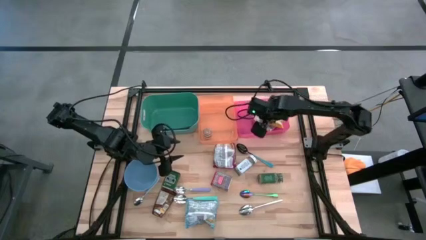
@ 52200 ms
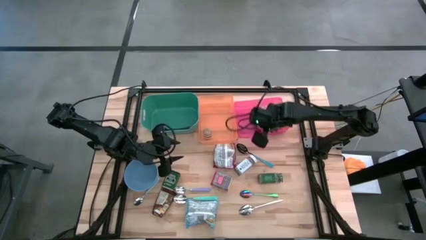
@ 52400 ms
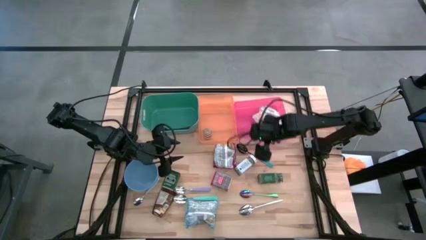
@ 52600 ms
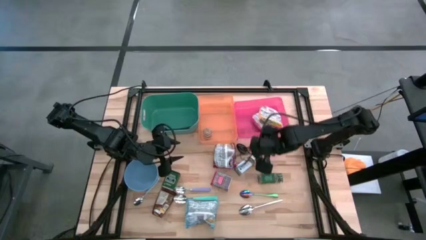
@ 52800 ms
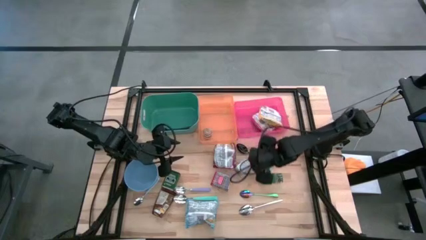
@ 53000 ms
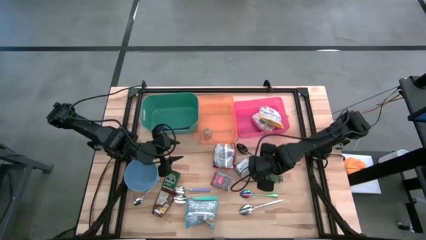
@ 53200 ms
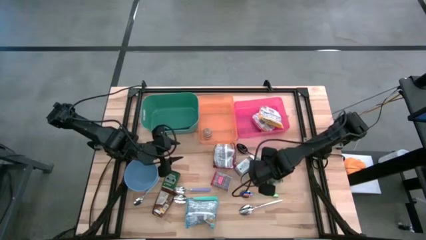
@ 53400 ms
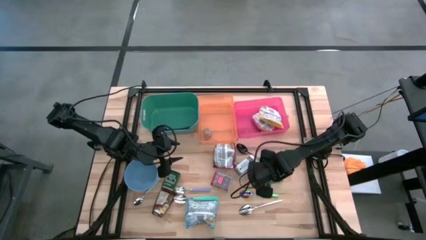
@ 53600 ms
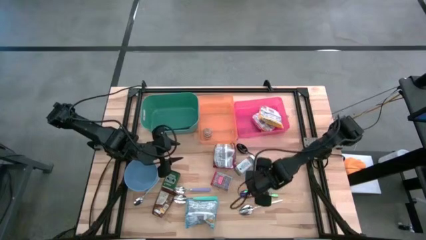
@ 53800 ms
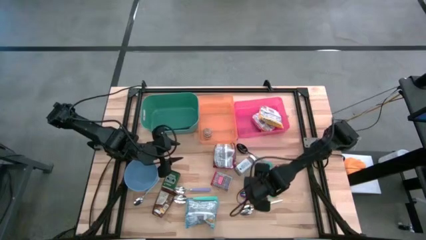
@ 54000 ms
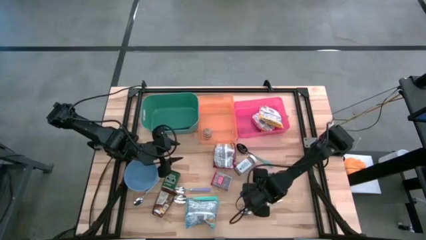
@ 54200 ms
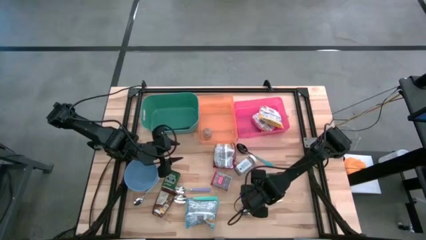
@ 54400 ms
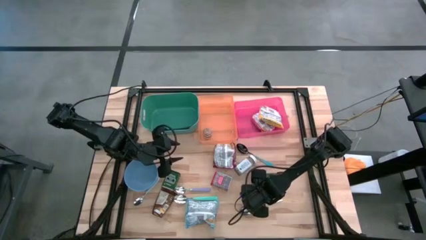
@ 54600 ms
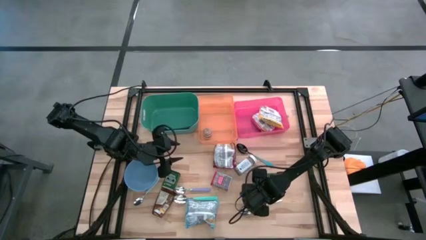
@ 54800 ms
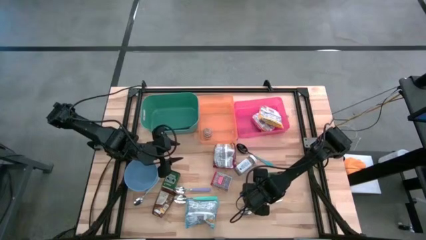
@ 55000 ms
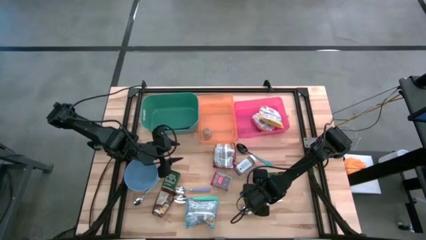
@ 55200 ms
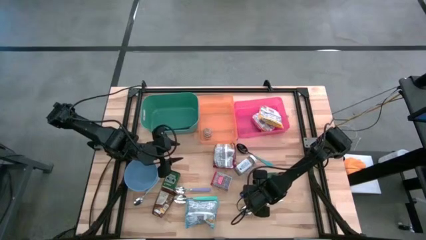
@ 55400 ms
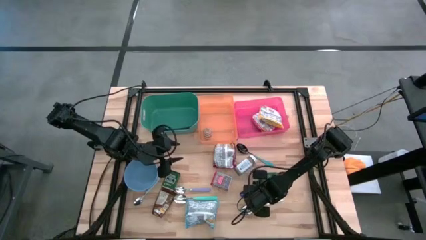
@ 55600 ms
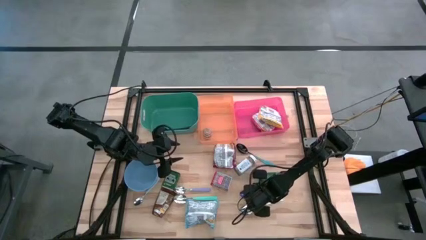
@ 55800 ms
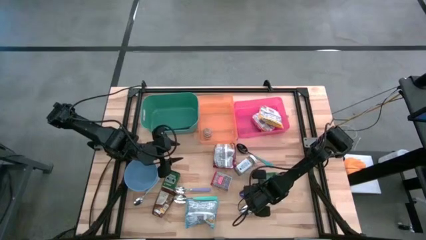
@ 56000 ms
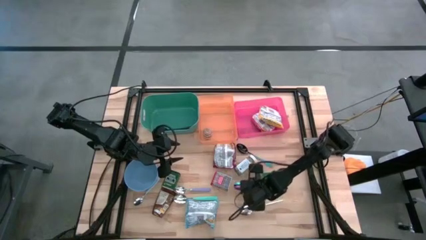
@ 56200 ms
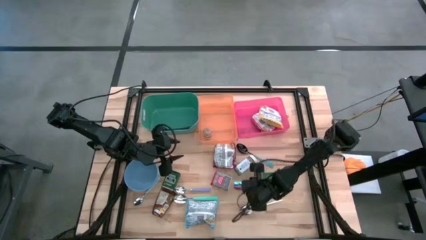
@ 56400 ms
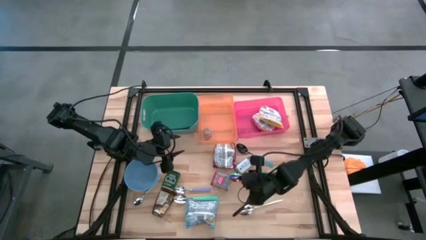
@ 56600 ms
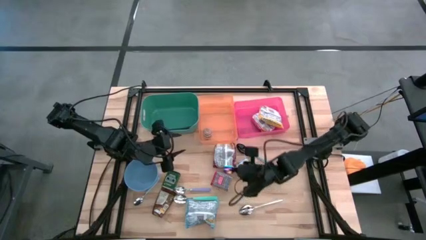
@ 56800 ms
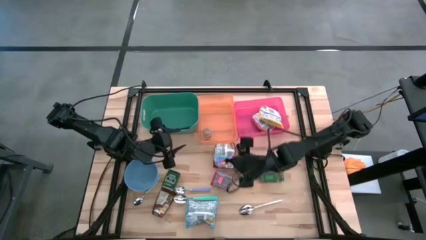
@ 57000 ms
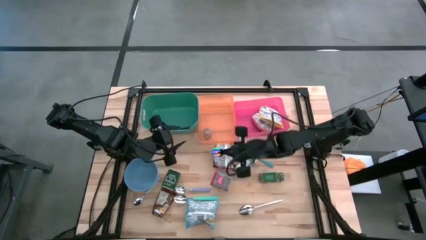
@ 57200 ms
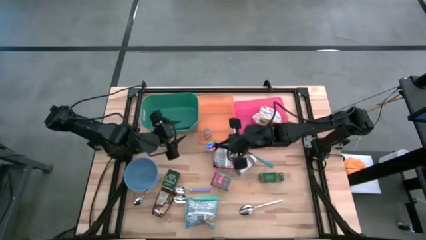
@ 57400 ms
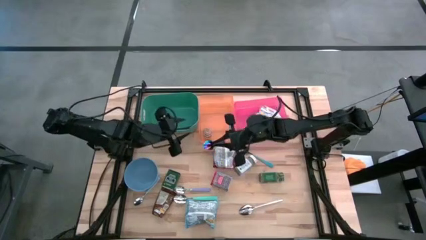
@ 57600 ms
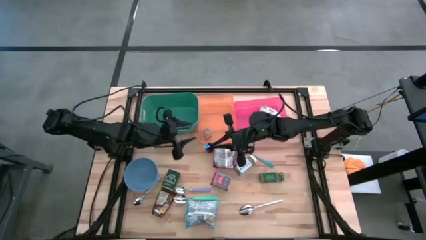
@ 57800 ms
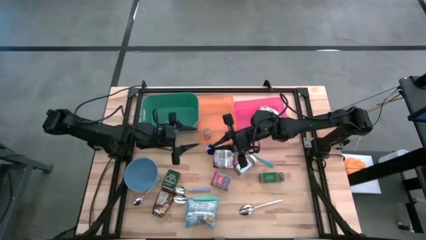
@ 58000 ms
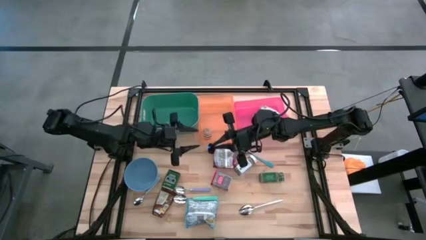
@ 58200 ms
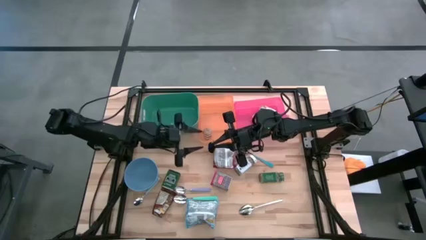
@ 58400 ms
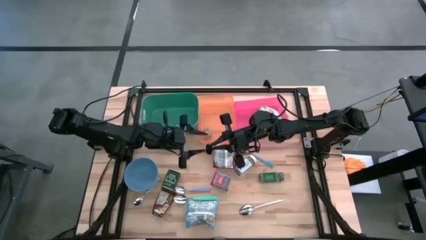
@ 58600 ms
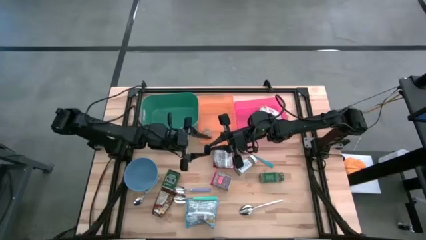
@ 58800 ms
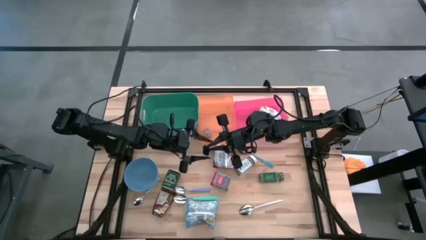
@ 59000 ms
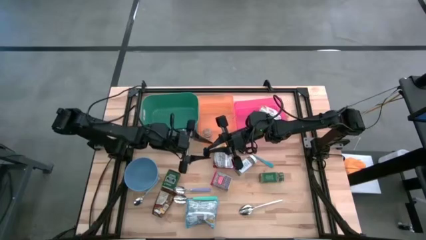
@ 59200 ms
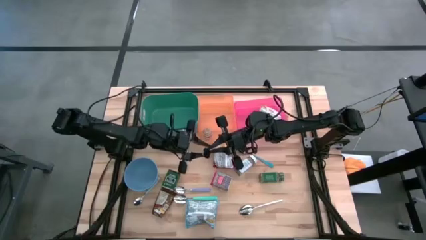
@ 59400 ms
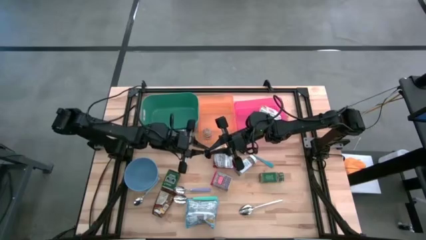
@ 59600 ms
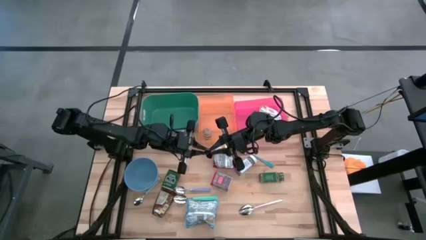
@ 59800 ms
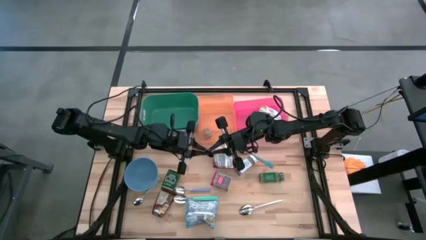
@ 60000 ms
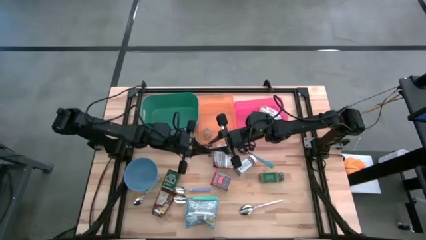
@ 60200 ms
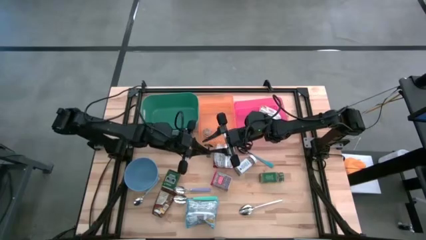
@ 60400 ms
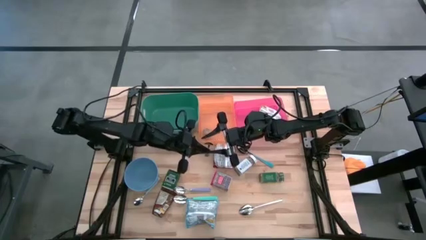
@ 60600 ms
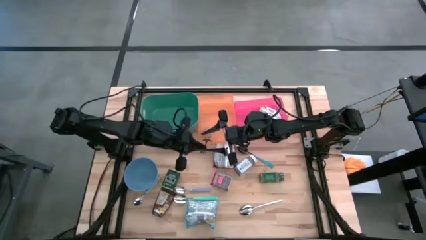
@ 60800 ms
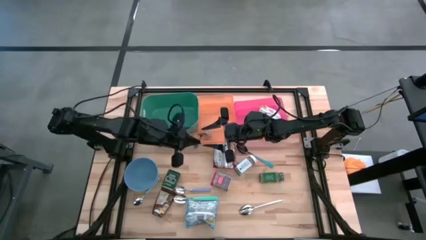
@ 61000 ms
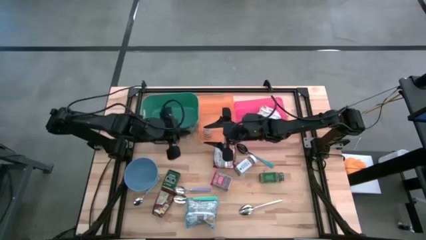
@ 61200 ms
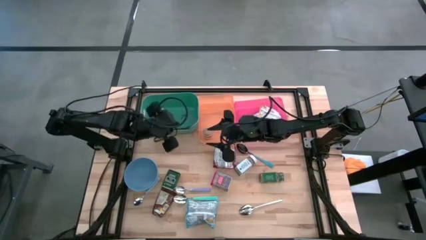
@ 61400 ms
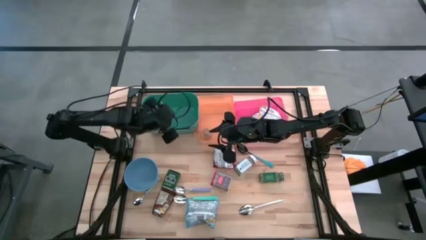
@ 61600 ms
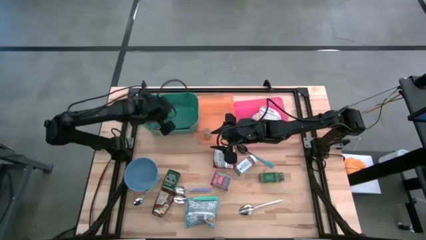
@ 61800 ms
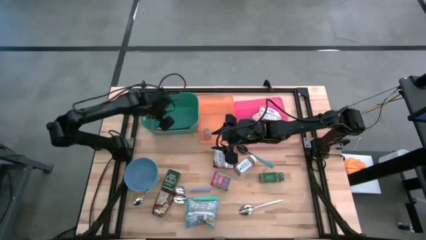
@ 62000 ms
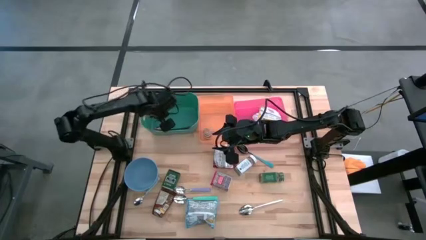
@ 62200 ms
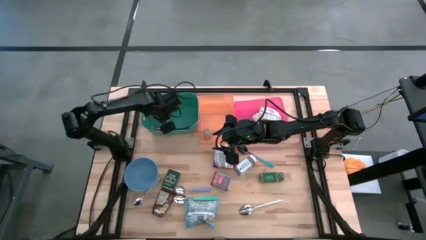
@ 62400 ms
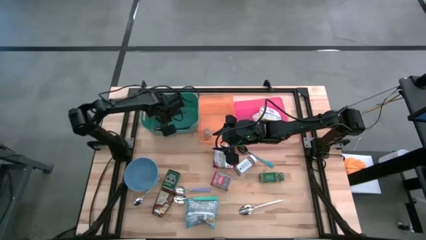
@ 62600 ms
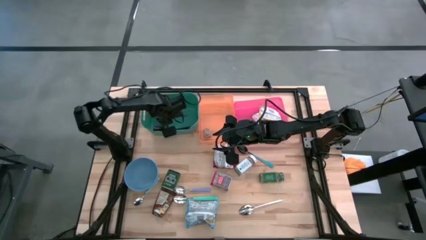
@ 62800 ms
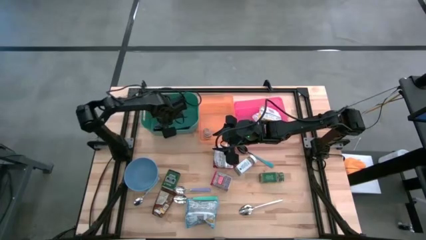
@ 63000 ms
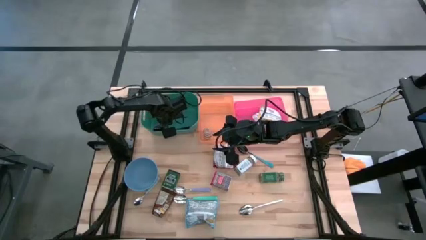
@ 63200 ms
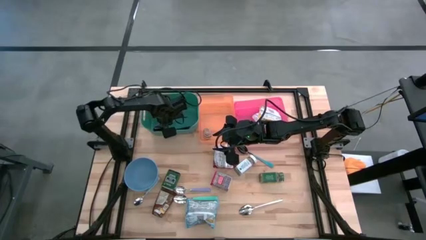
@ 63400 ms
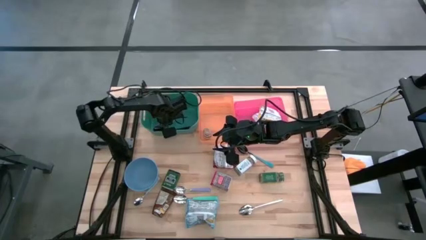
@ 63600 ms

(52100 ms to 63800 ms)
Put the blue spoon into the green bin

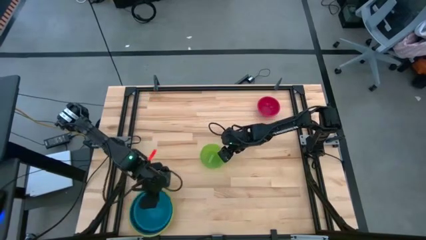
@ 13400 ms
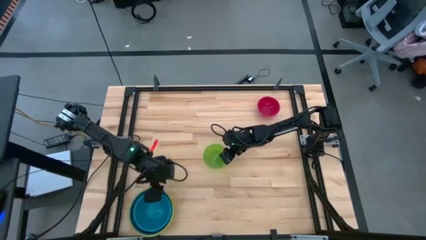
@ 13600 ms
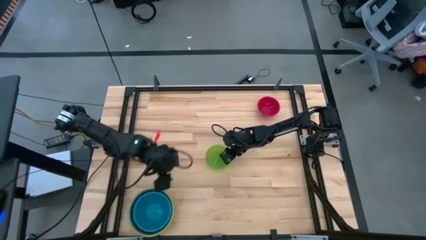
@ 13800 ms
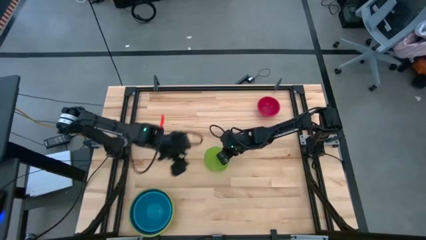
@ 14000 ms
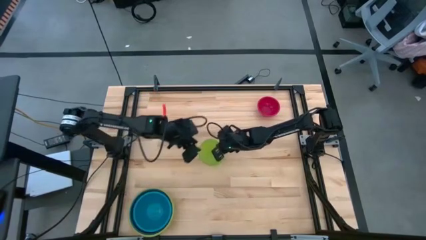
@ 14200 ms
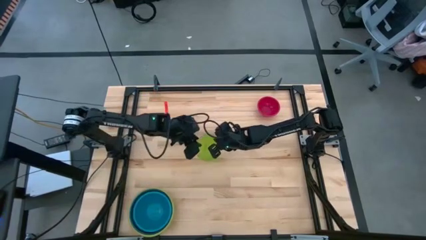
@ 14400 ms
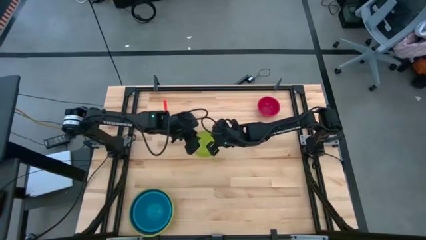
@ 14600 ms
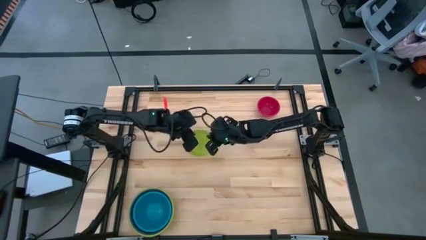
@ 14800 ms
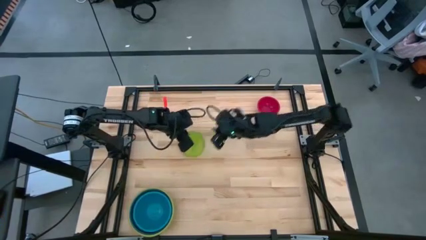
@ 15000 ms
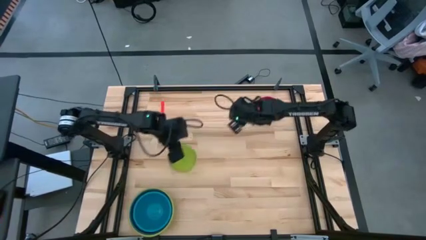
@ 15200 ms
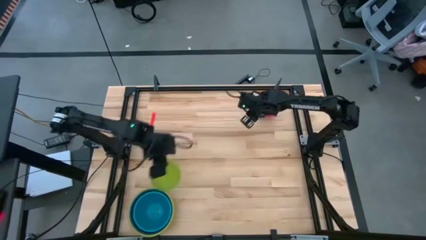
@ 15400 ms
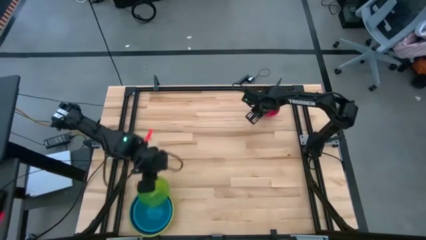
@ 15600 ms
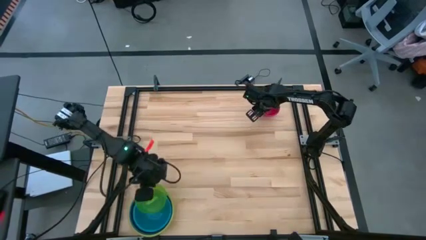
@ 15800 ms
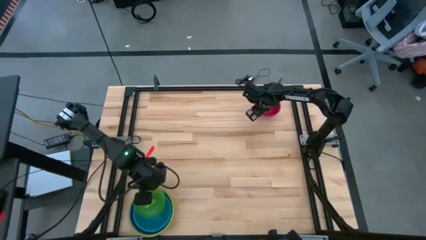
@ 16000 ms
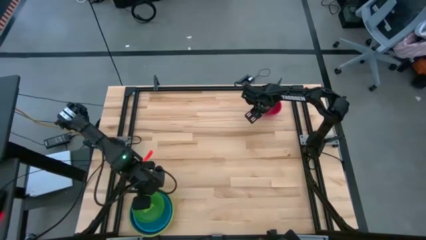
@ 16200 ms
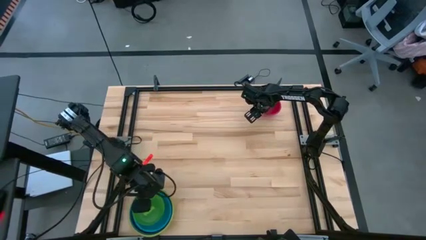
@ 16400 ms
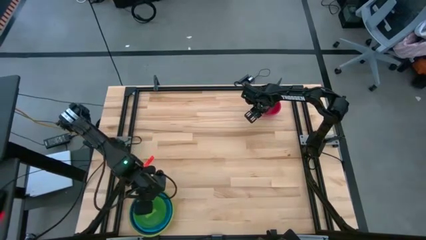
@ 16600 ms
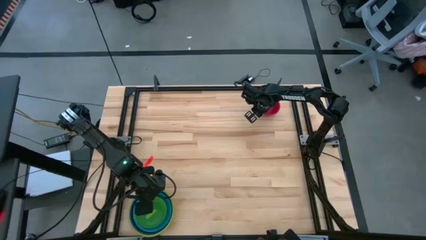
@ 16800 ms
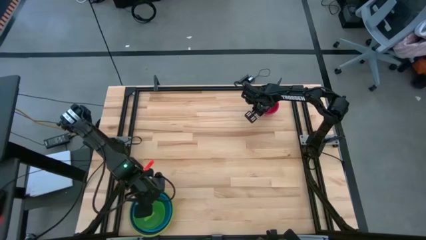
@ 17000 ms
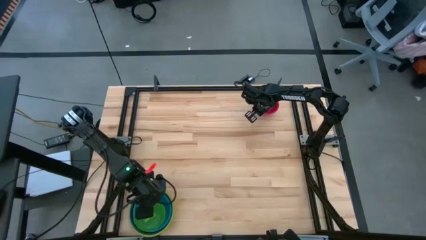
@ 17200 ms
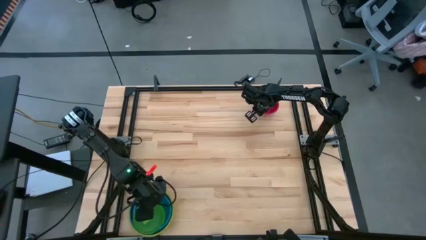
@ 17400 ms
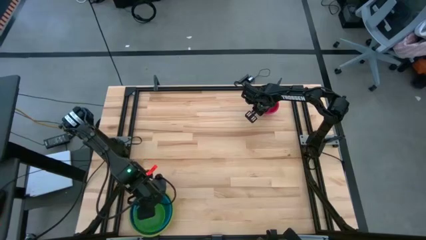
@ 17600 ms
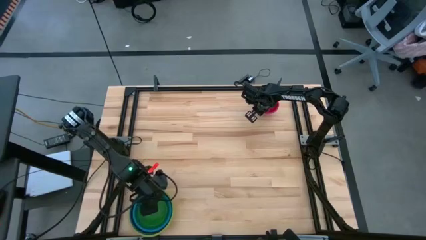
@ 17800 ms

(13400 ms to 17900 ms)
Stack the light green bowl on top of the blue bowl
